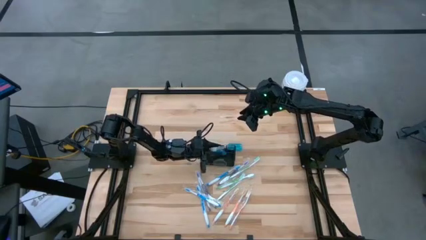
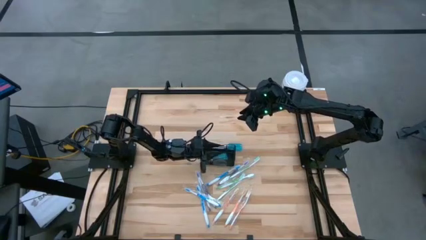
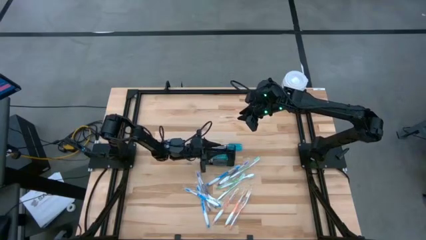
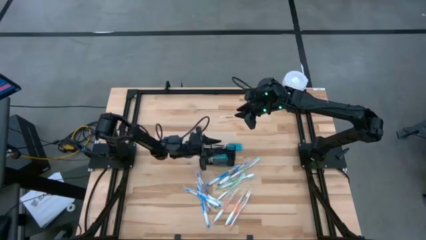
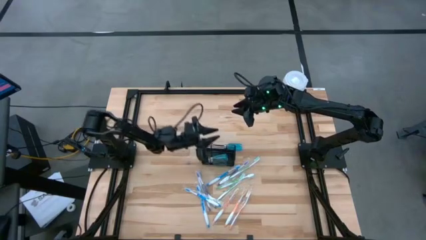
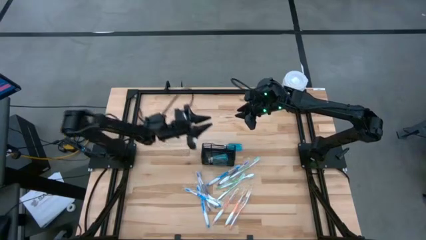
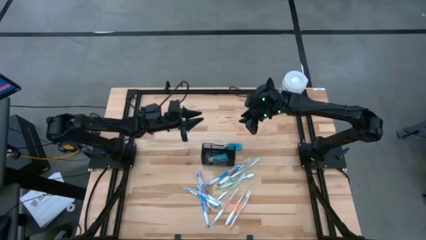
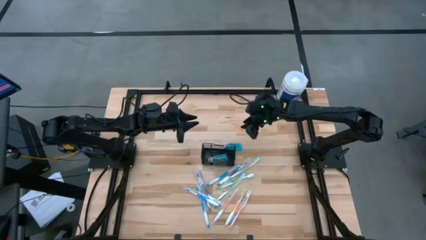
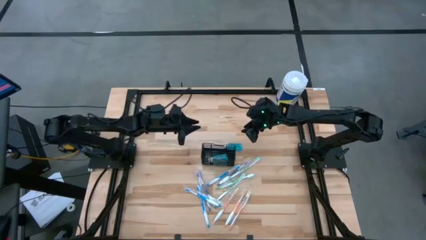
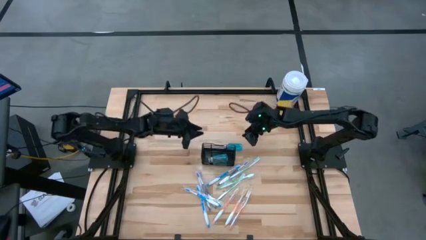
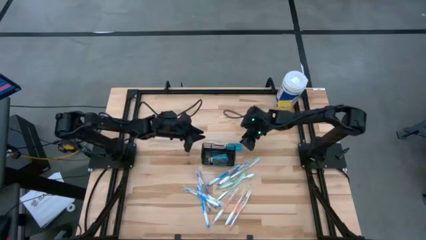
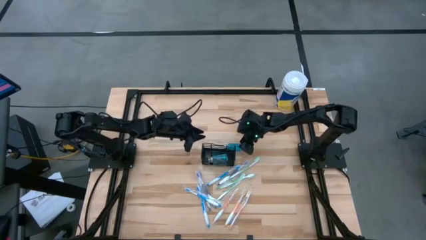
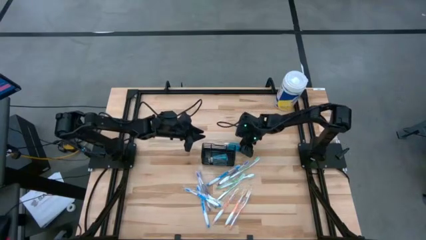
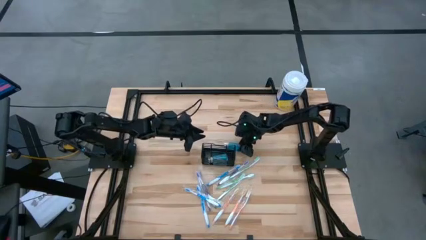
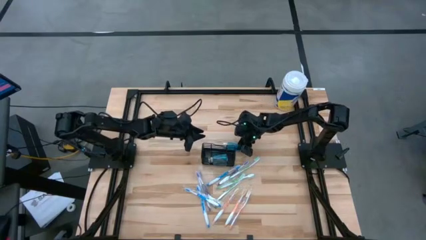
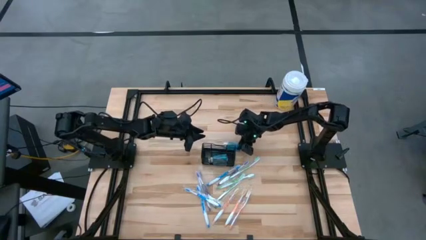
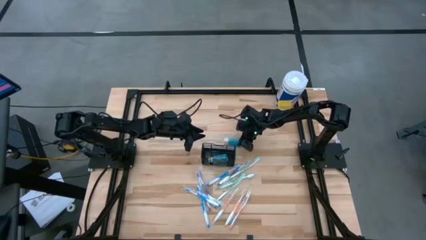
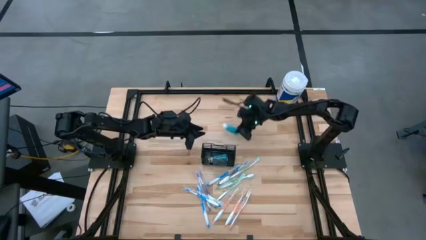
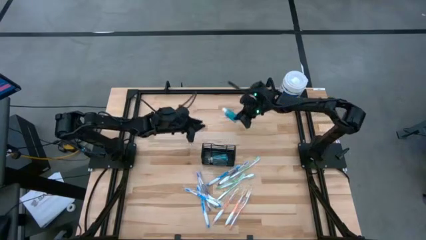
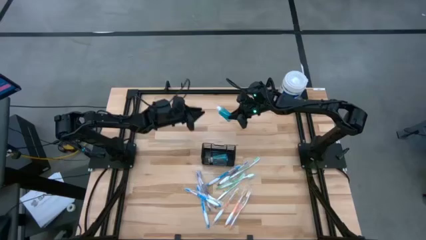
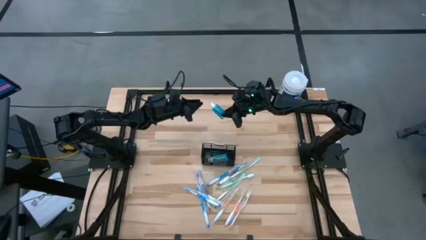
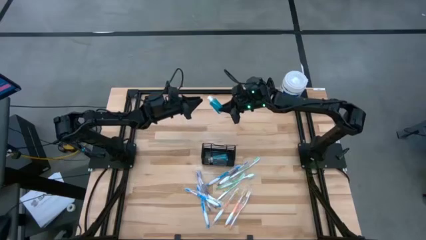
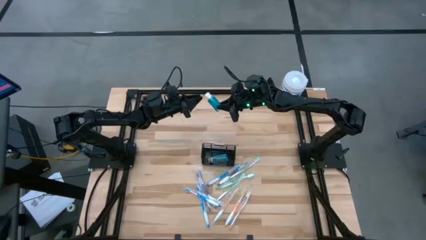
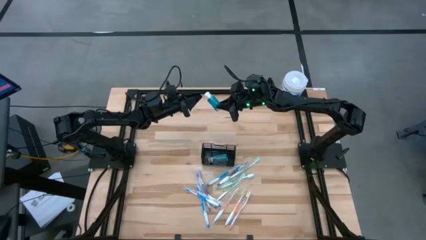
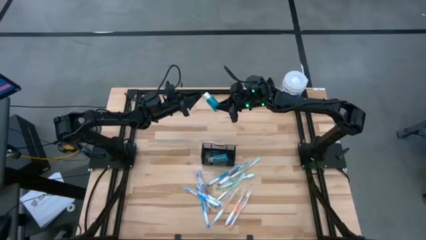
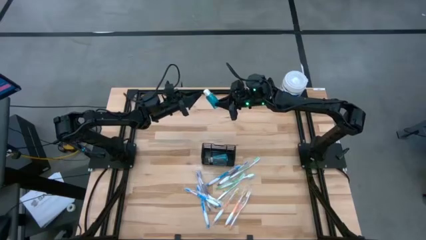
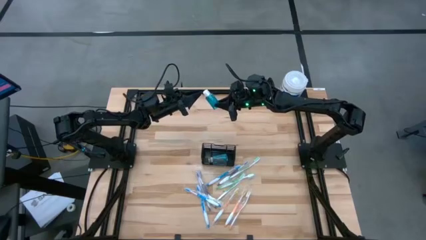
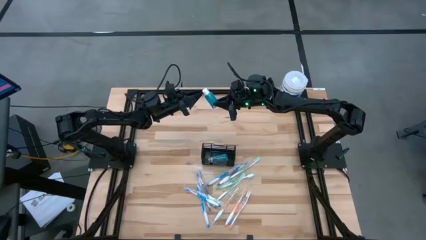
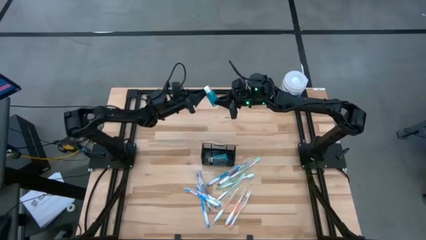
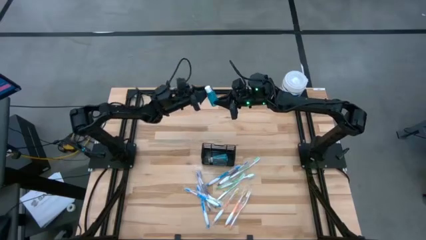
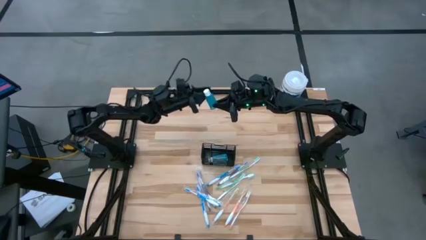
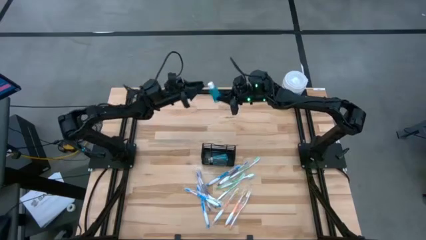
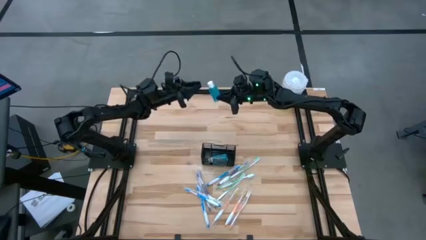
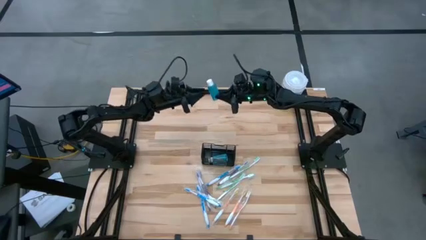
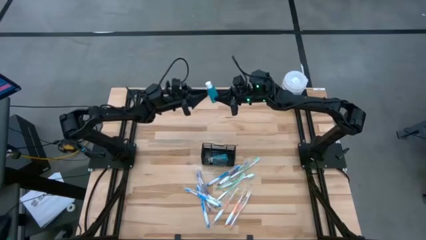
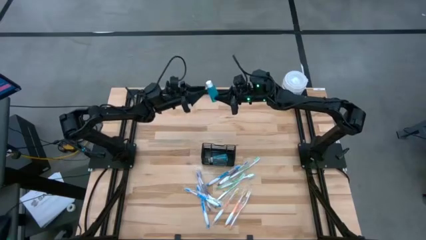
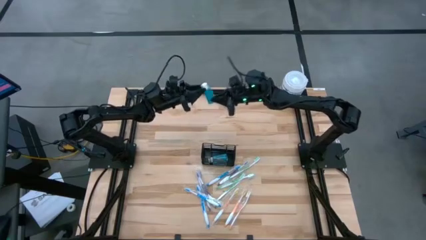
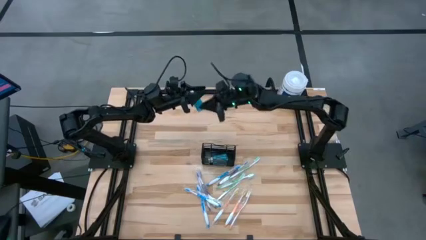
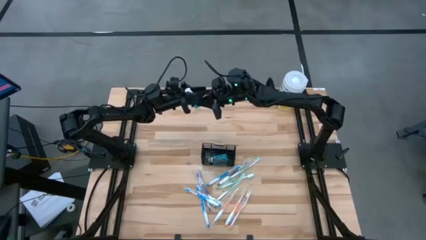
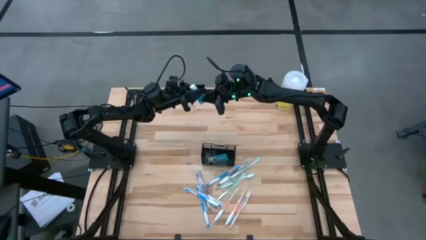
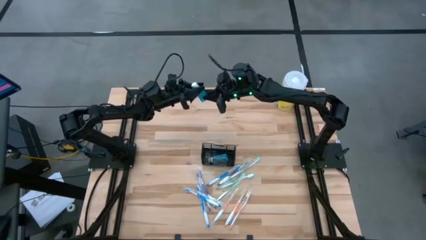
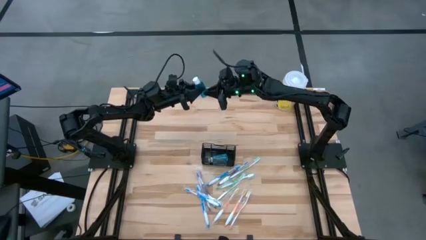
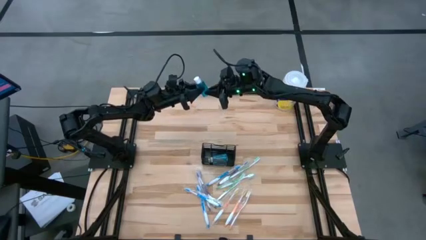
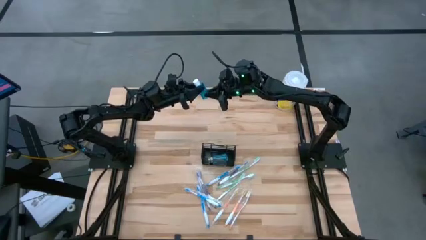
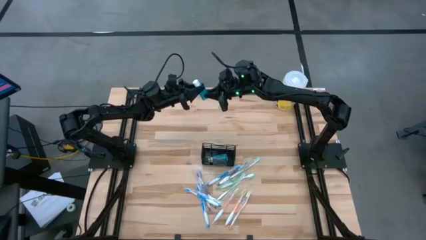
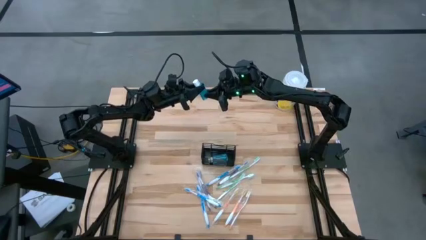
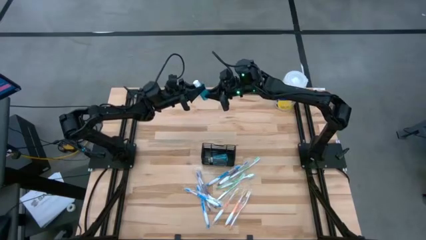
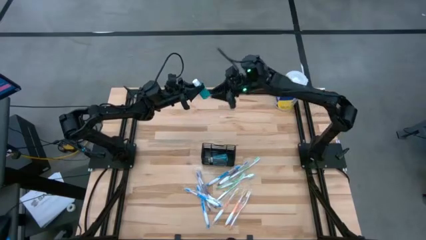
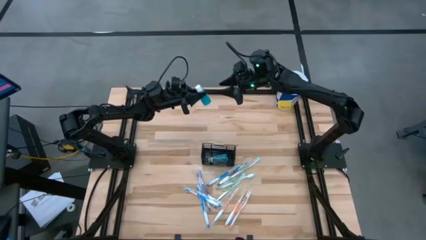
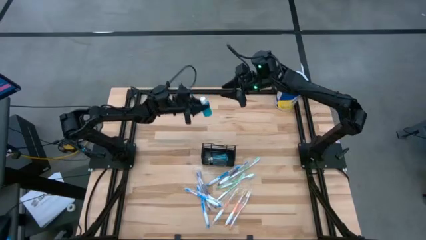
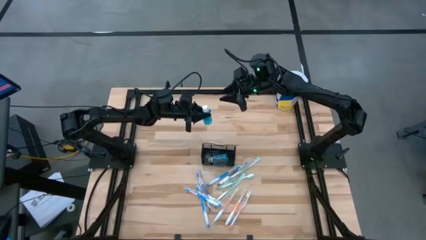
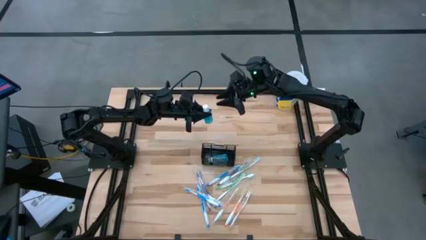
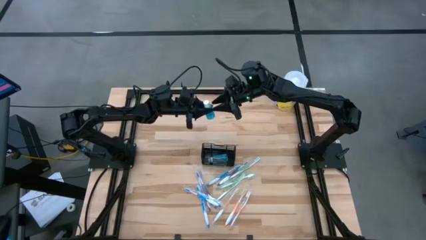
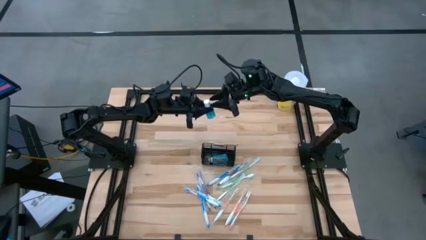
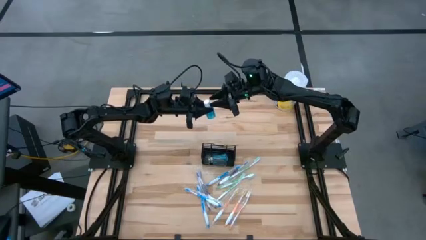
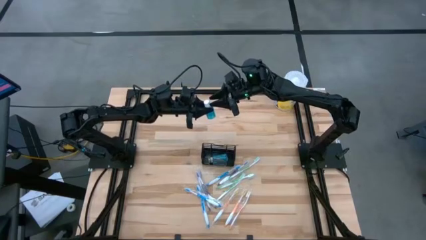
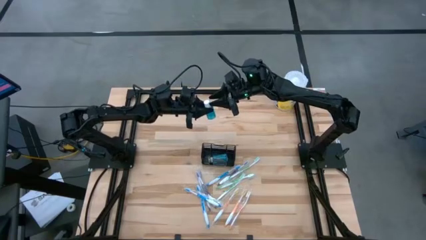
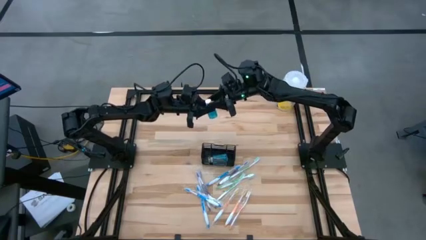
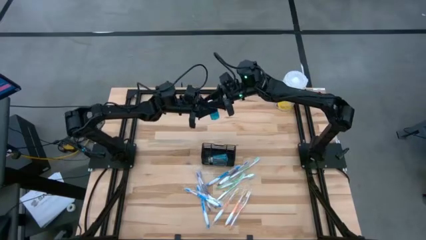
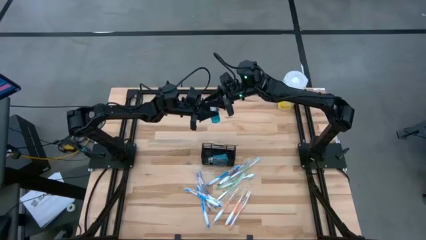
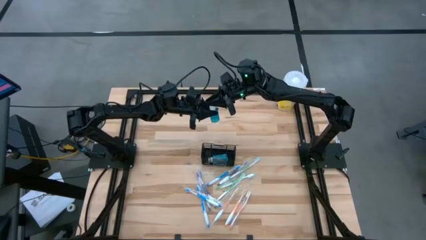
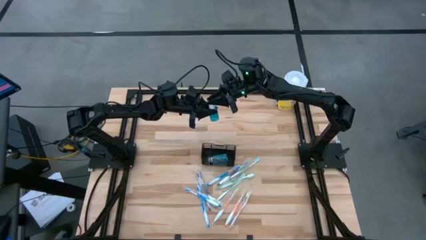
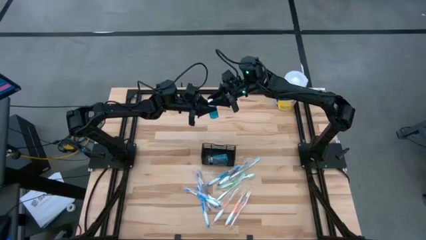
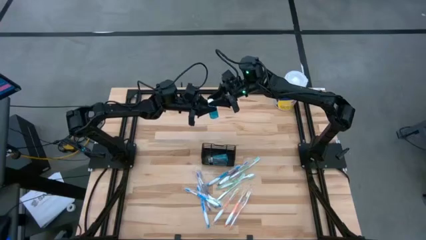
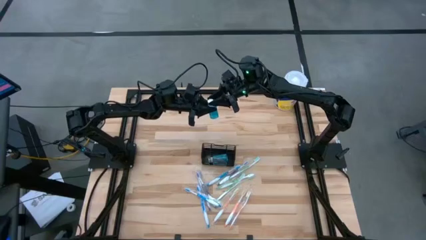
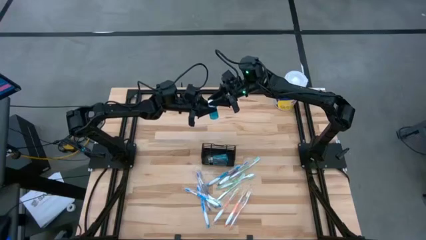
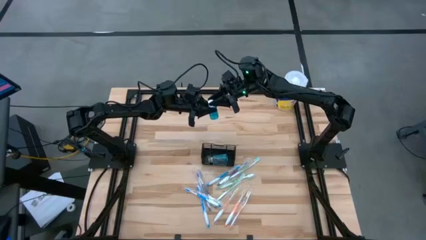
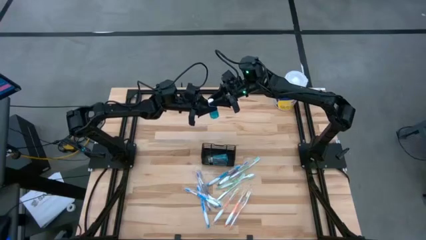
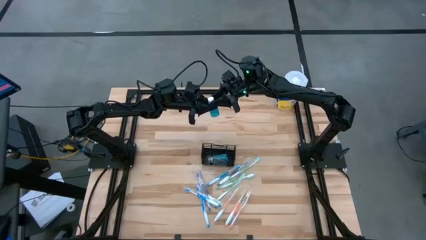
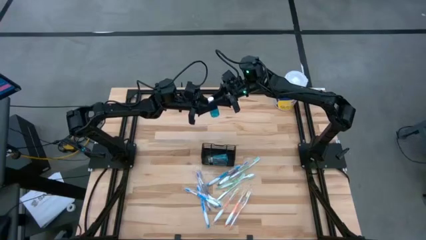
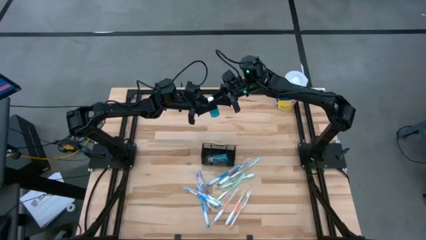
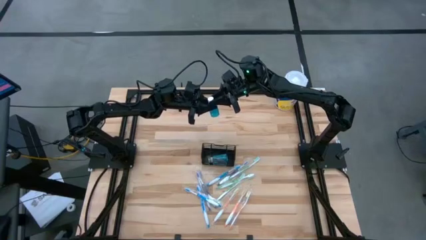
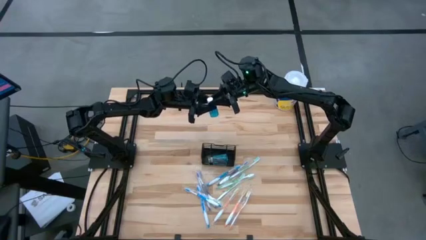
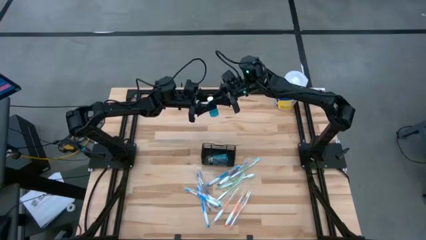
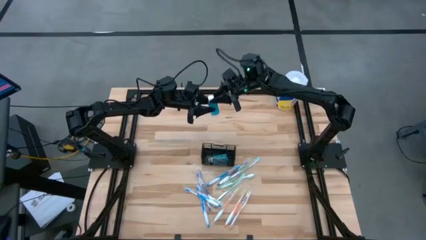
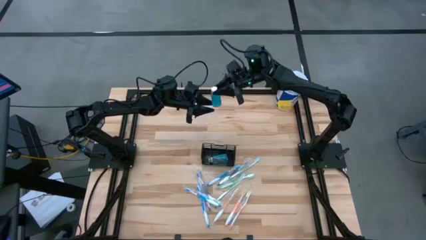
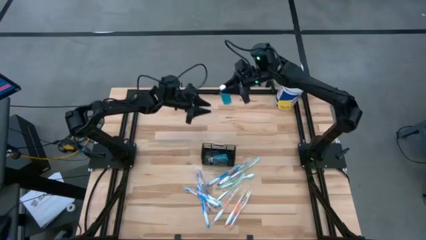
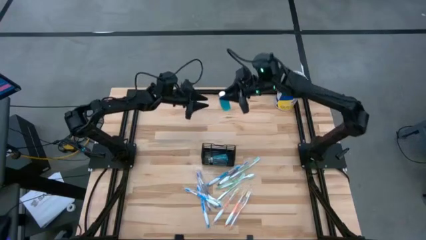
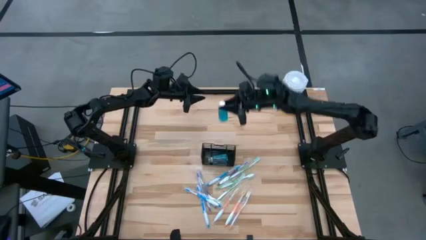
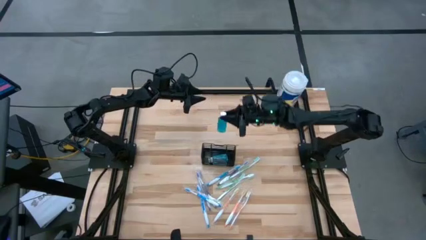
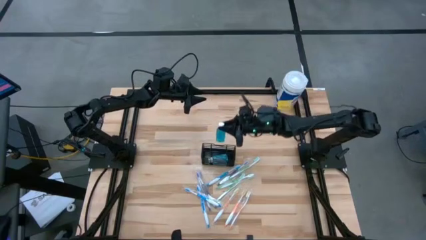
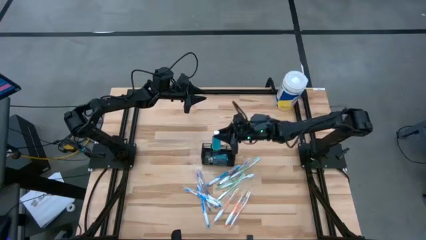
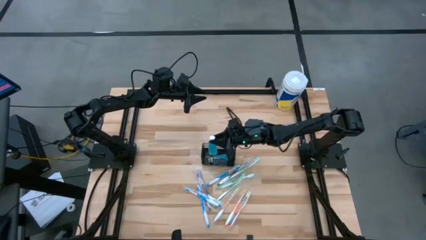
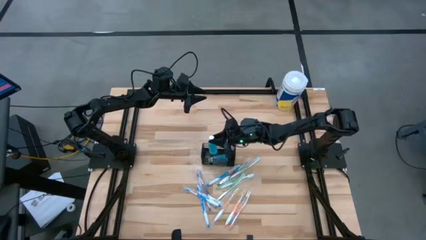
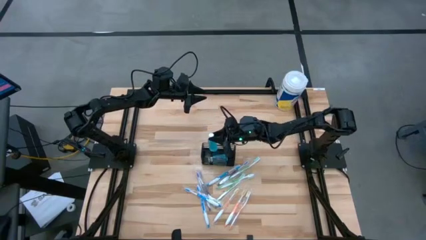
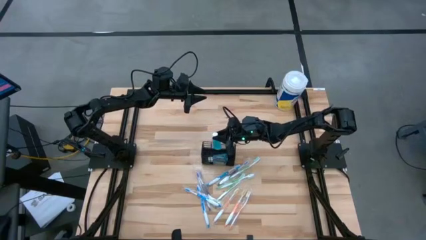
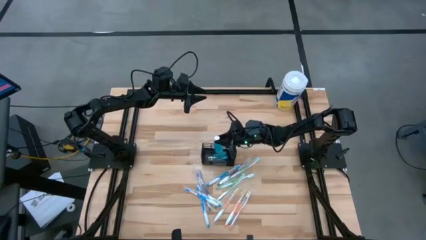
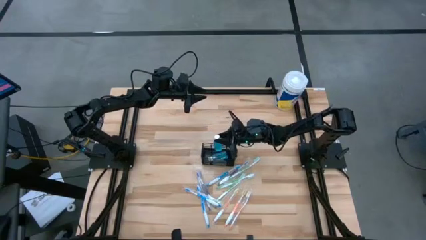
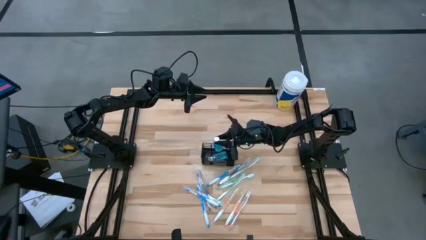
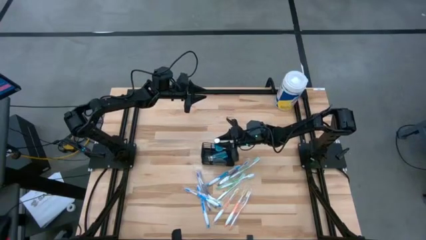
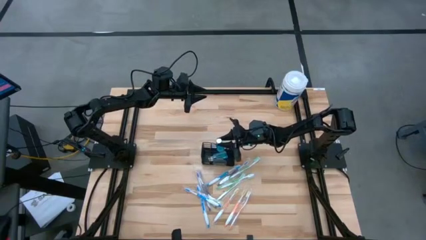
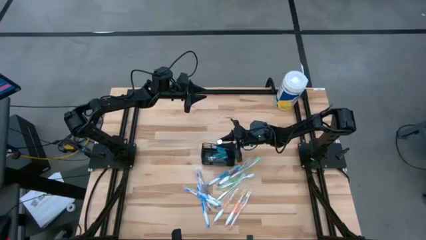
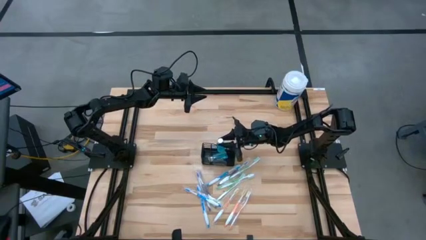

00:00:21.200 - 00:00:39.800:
Task: Pick & Place toothbrushing station
Put the blue mouthwash into the black wire organizer
